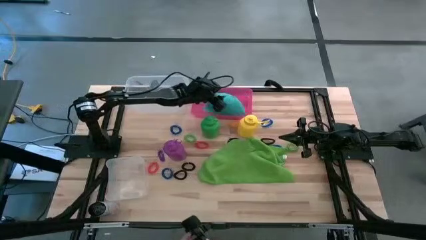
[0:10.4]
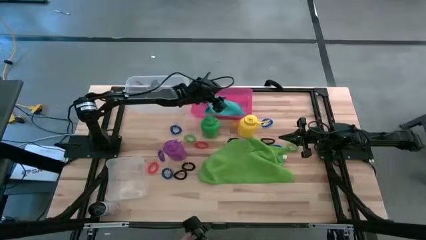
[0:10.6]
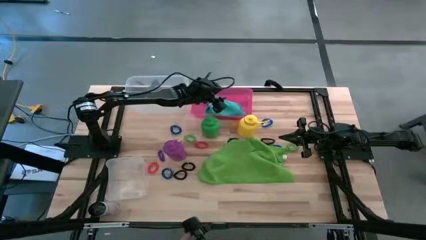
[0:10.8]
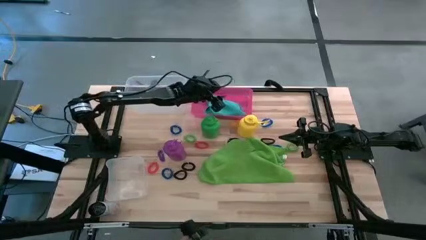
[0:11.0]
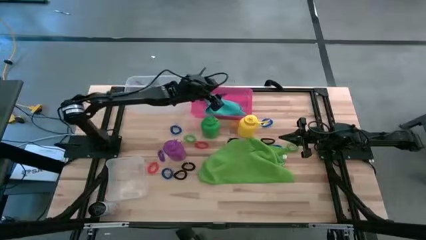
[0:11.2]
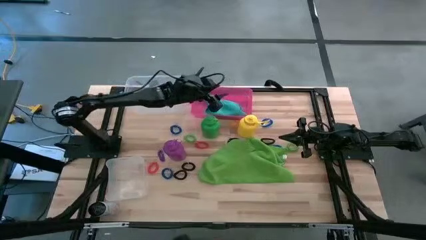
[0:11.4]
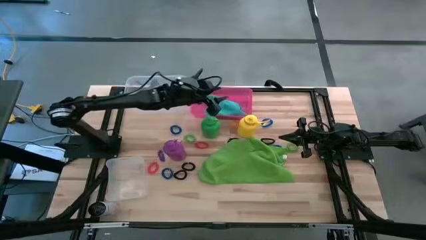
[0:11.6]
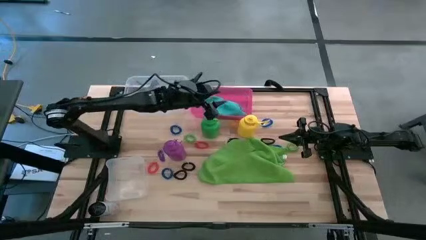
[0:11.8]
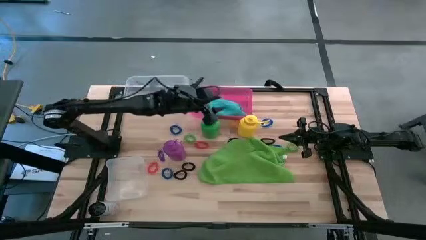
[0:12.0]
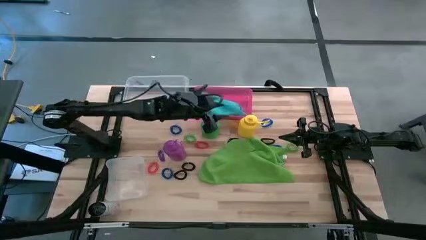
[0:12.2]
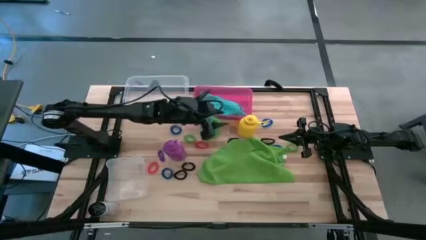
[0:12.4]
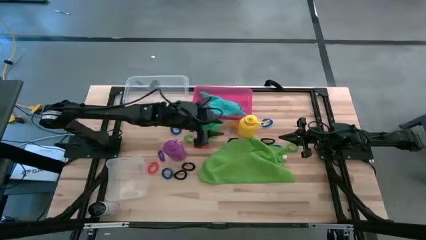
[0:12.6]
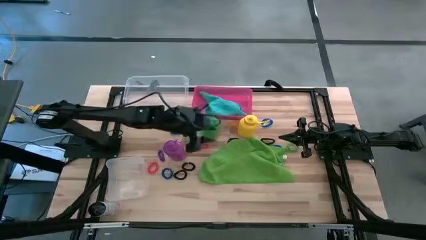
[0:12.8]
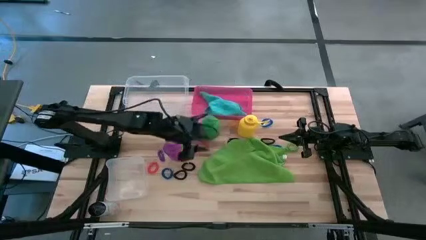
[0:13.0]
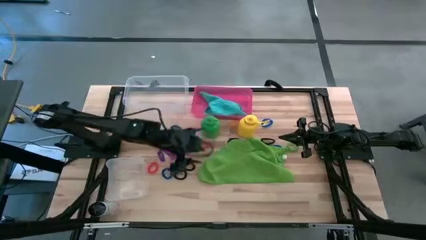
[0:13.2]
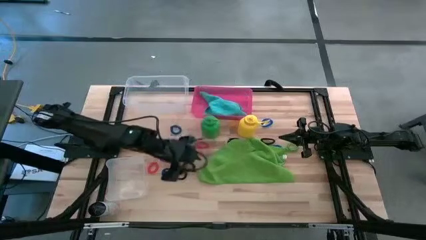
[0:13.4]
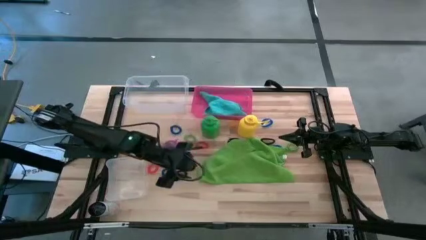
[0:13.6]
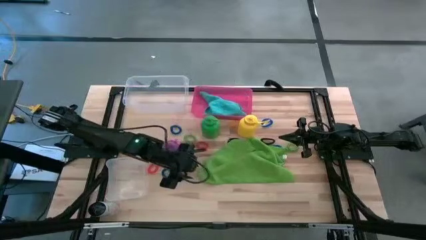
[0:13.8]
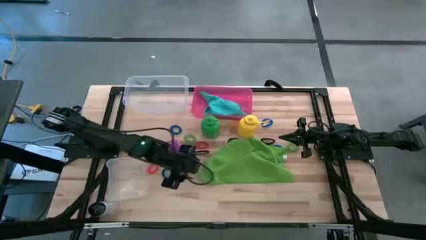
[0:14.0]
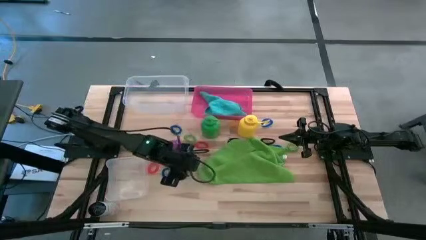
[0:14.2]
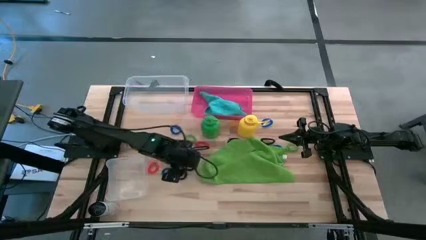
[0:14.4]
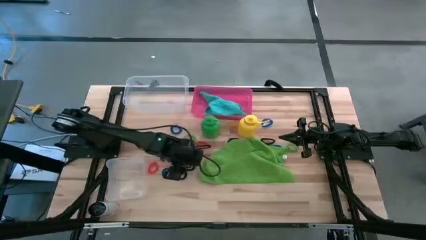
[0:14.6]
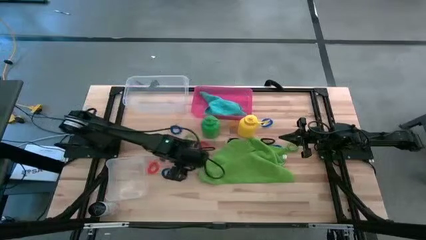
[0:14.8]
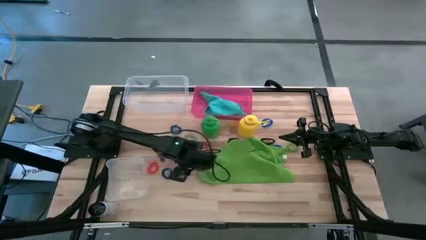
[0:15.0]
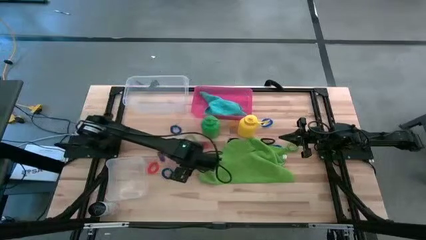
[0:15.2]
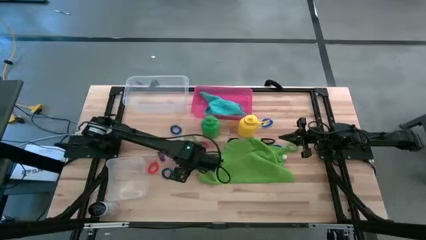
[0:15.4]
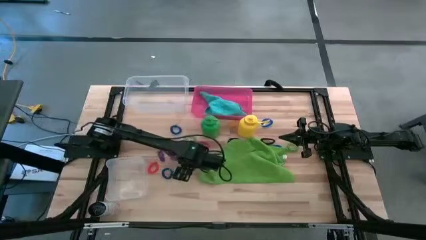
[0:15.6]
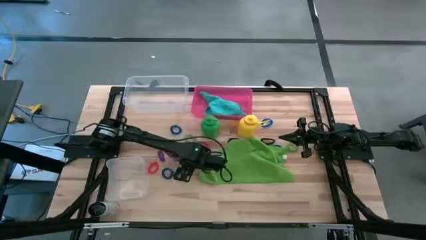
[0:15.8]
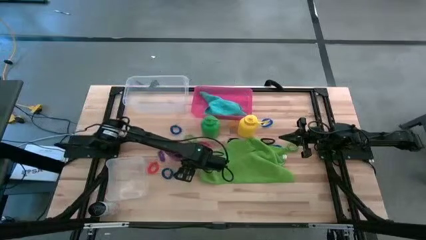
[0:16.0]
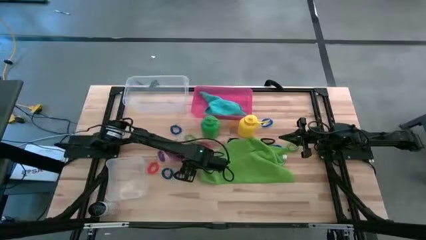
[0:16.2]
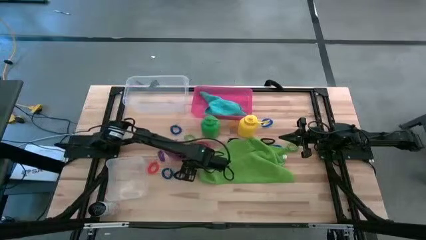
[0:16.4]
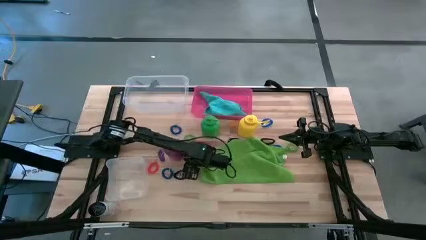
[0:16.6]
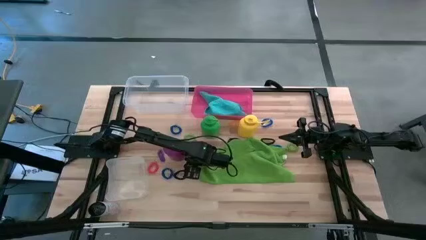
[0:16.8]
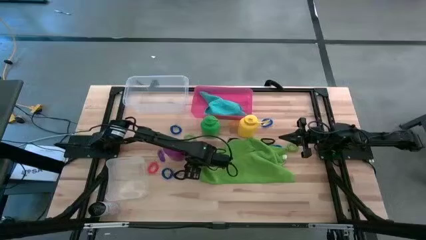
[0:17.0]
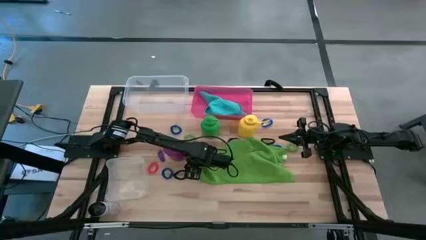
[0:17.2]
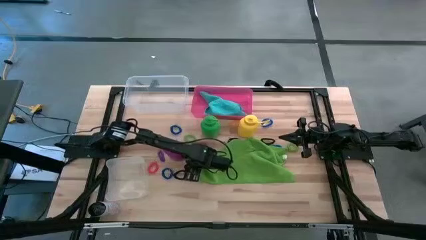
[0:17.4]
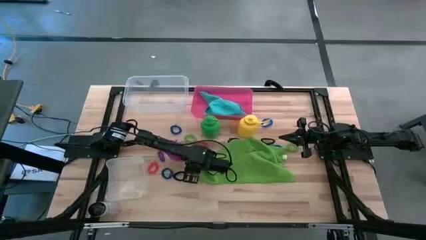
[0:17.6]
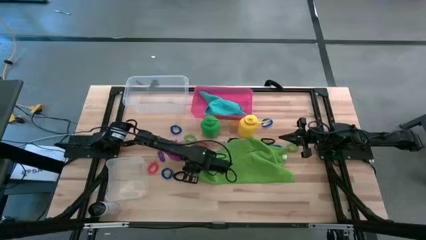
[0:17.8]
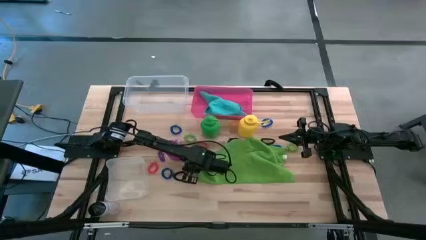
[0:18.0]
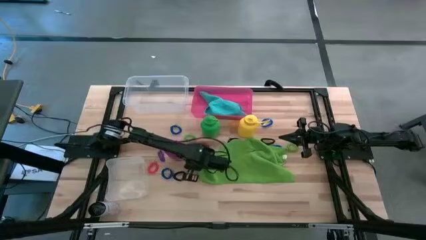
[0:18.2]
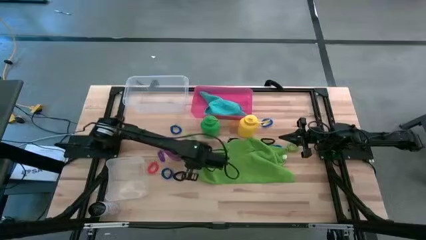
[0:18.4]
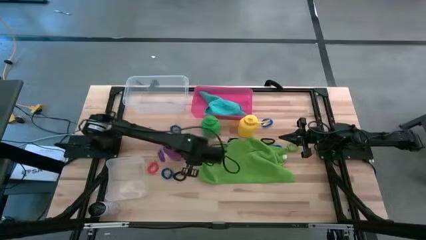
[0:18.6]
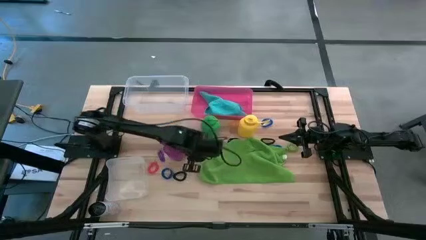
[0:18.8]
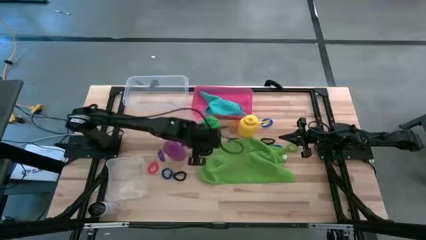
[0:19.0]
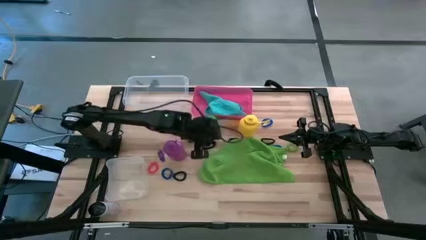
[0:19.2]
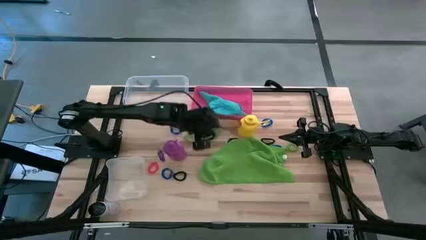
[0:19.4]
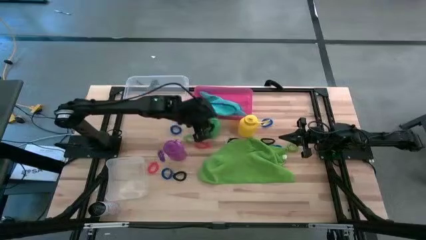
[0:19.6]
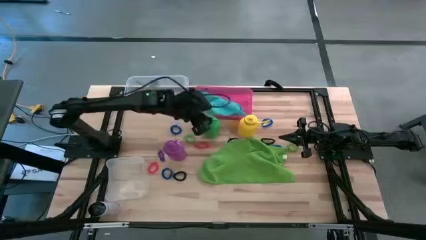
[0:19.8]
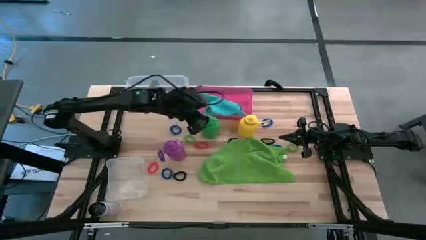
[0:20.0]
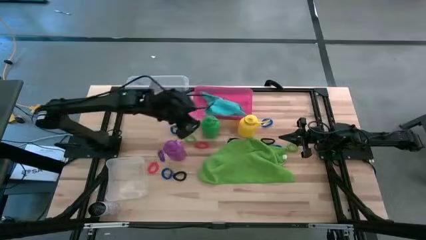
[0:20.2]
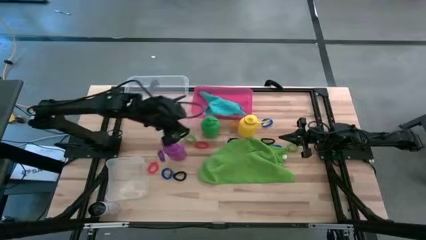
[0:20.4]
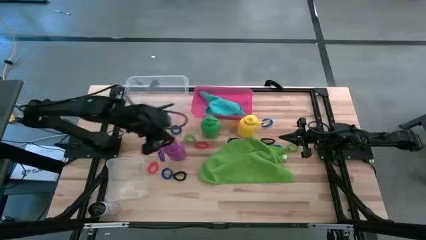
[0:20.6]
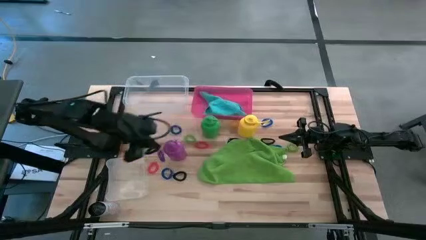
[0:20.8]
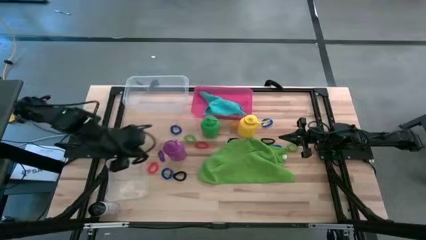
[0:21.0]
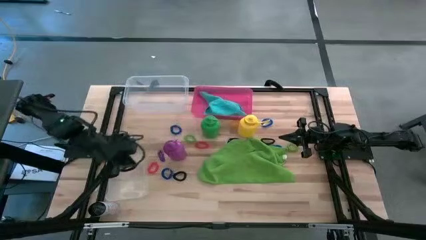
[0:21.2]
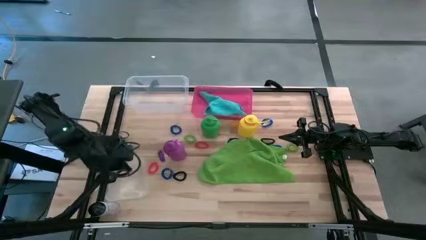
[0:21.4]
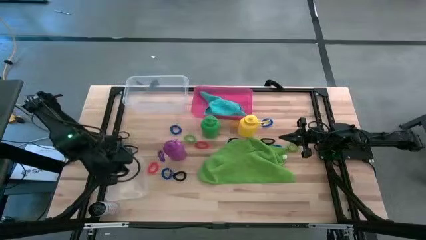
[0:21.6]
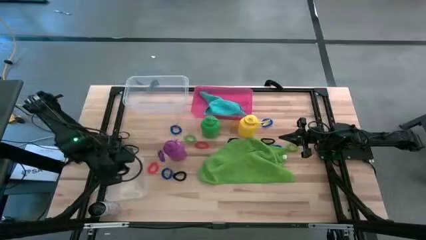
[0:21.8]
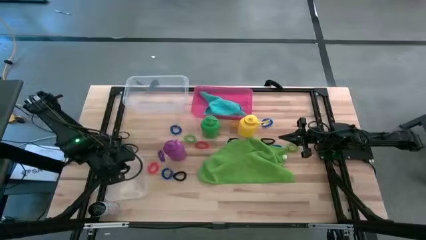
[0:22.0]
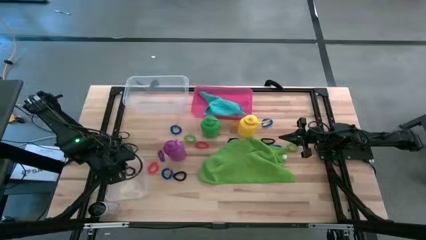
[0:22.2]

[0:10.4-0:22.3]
Task: Pick & Place Sports Items
Put the black spring keychain into the bottom transparent bin

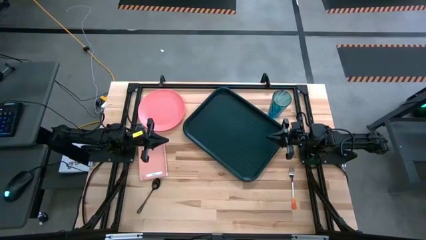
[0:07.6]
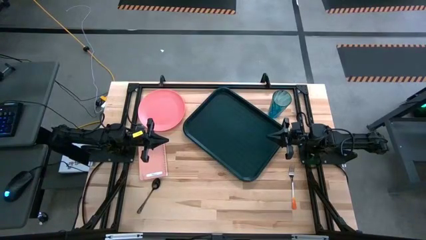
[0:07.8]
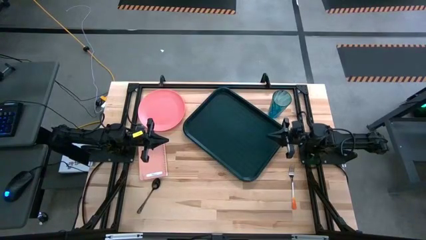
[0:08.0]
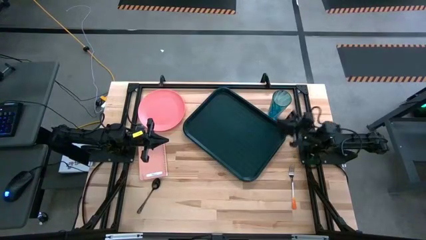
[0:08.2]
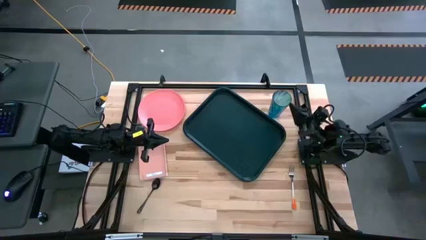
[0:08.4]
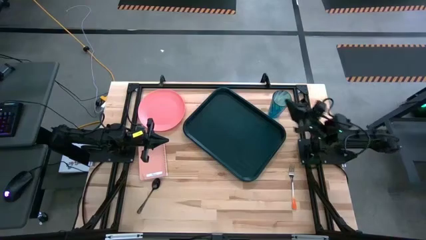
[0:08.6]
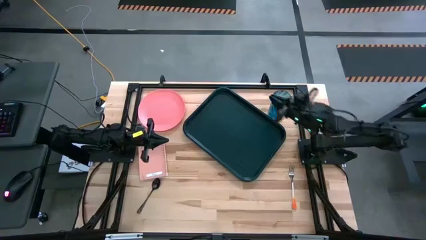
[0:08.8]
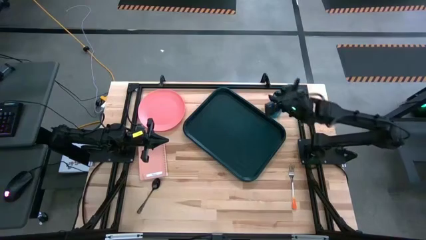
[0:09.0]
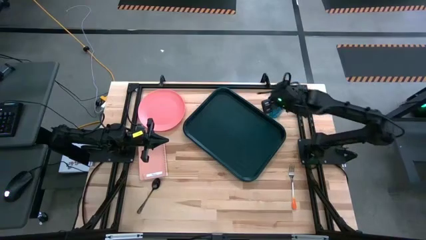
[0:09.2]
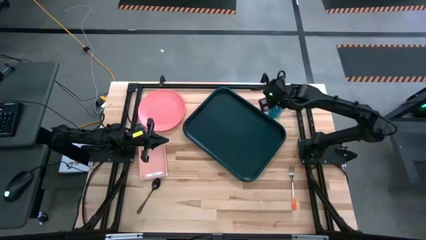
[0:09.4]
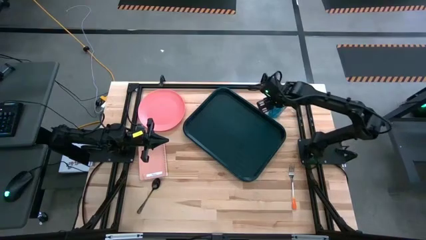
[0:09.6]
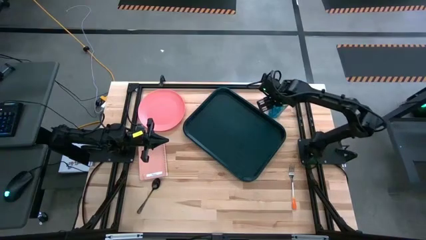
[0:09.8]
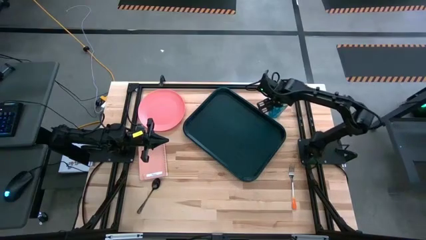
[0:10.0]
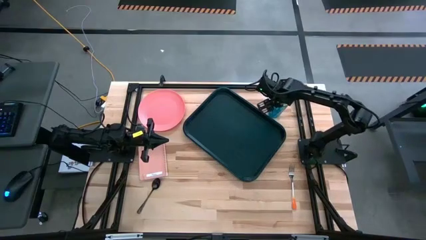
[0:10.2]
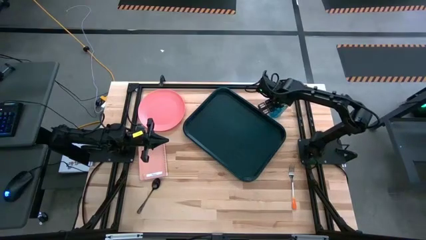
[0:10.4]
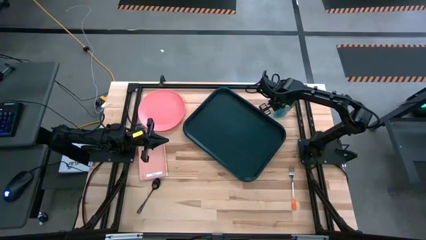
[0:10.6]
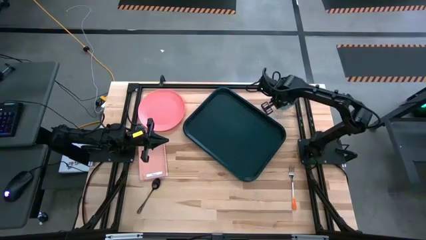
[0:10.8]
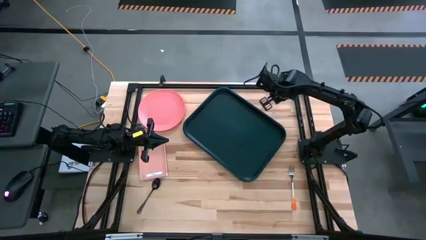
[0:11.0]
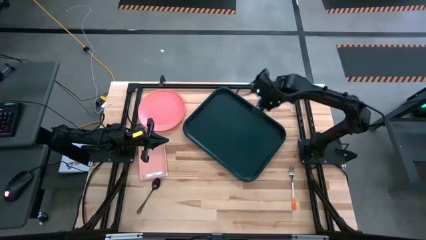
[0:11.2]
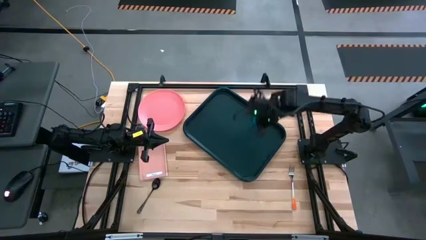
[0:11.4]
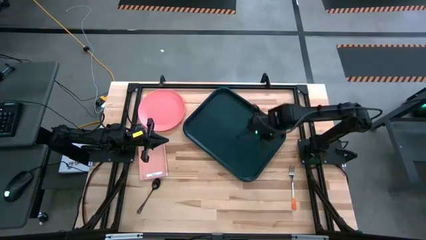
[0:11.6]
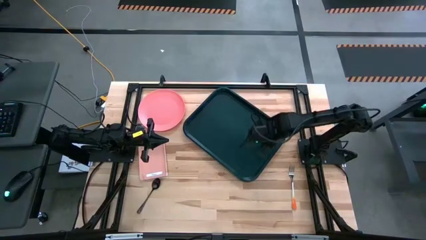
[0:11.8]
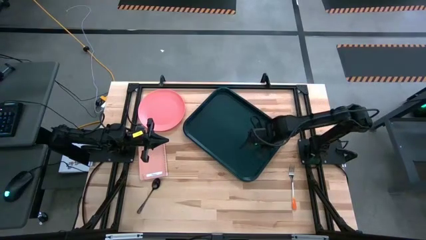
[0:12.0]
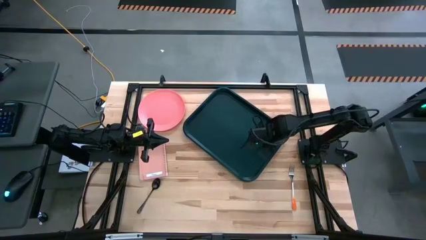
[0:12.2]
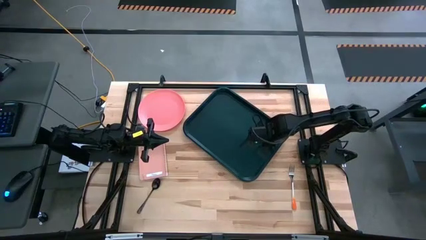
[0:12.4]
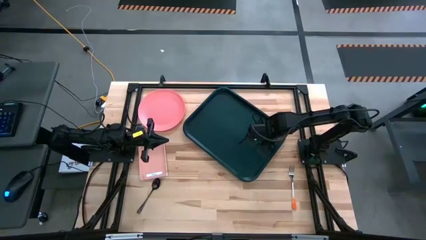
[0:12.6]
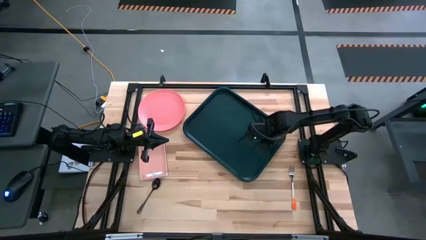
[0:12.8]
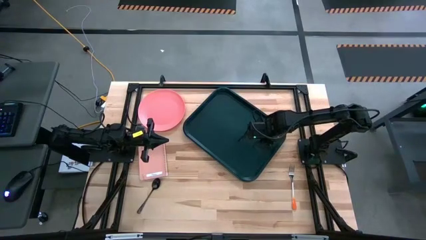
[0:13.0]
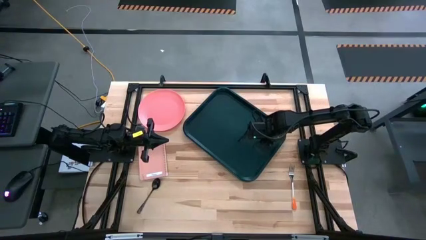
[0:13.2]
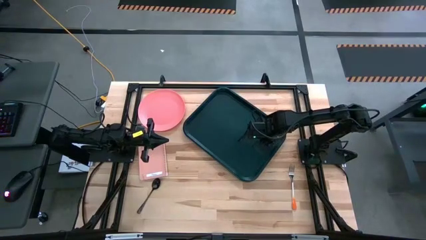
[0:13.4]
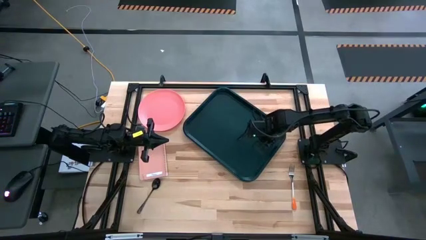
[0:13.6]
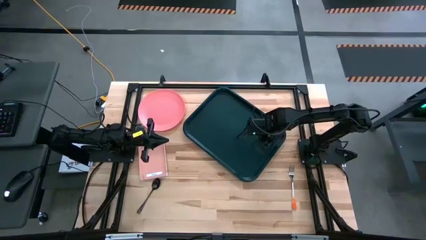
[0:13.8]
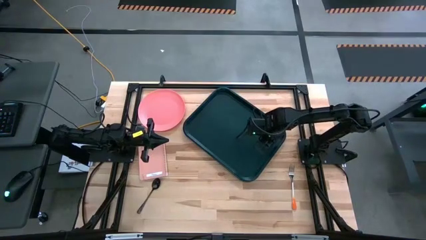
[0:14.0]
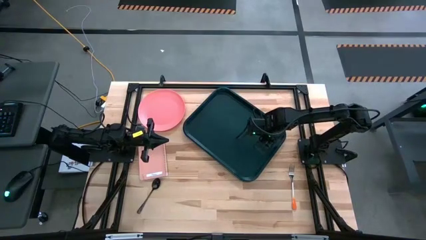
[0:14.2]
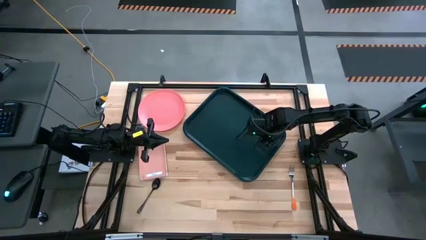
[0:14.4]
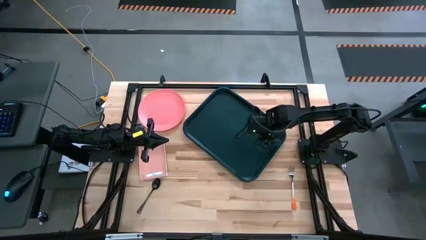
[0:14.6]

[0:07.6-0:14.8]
Task: Pick and place plate/cup/fork/spoon on tray
Put the blue cup on the black serving tray
